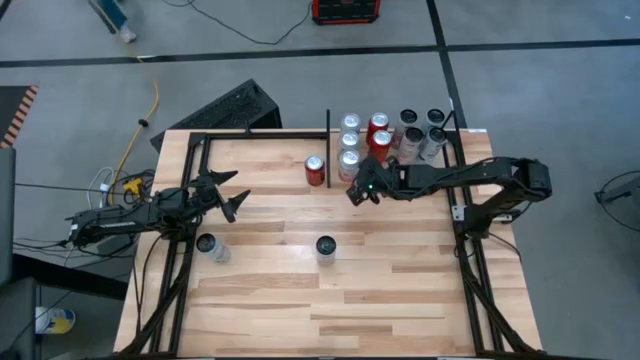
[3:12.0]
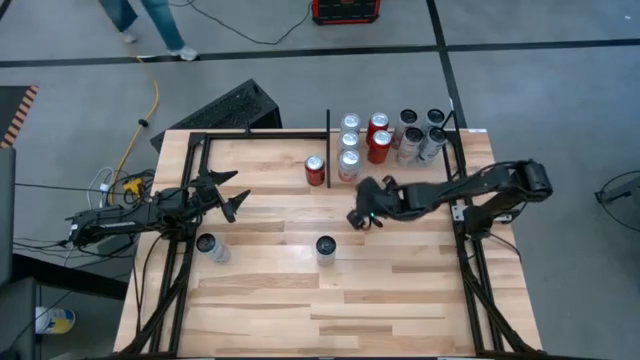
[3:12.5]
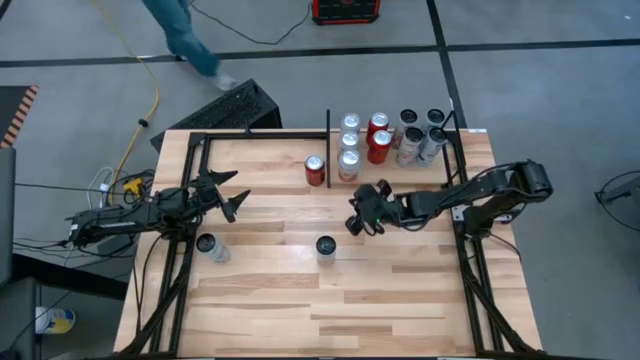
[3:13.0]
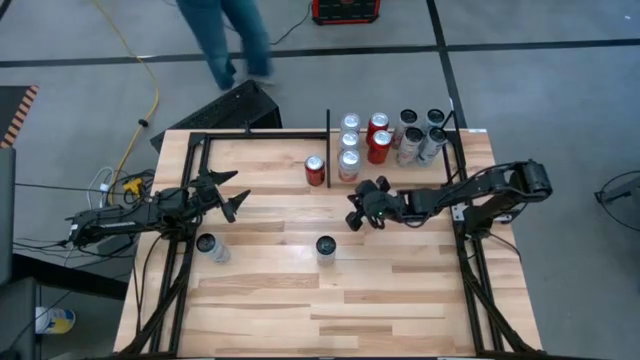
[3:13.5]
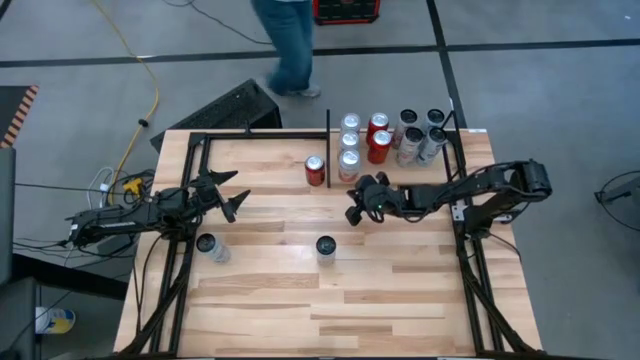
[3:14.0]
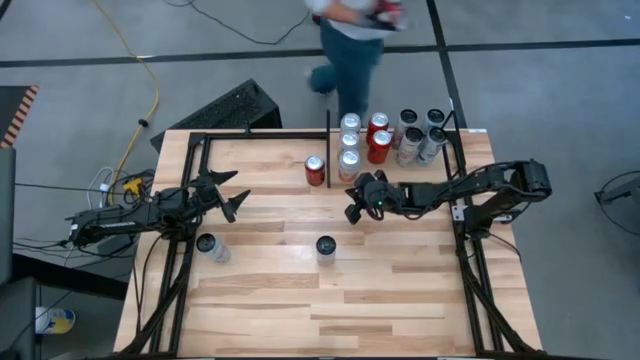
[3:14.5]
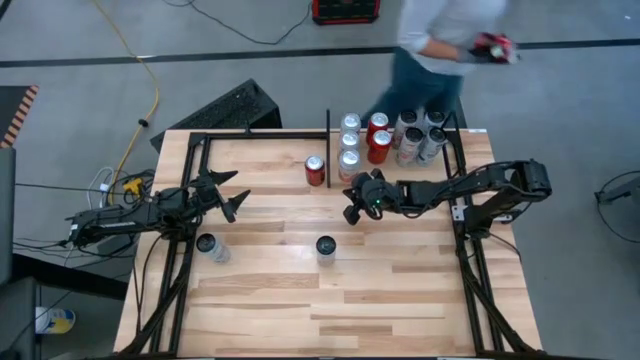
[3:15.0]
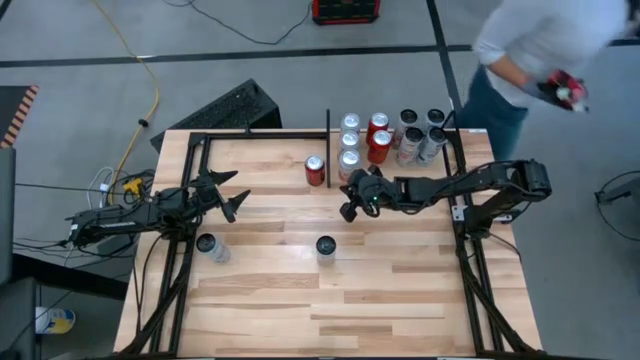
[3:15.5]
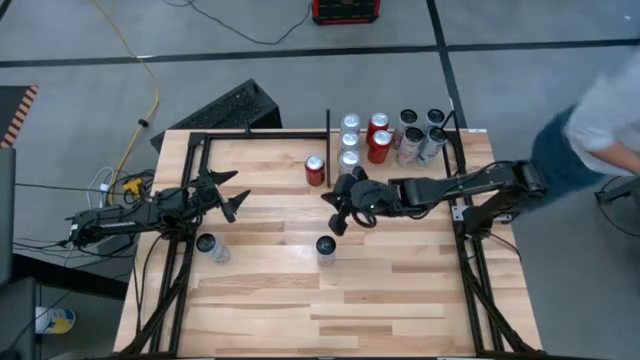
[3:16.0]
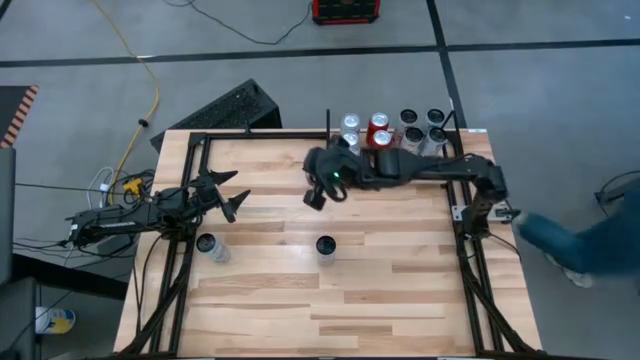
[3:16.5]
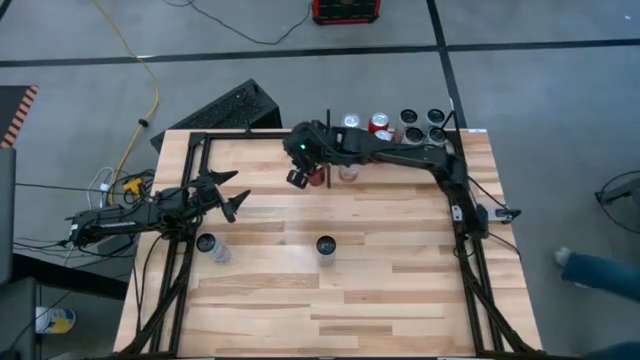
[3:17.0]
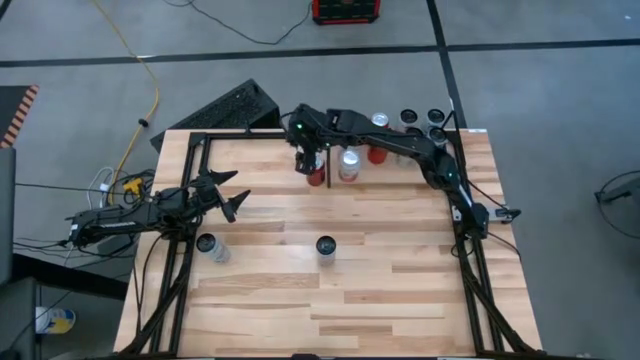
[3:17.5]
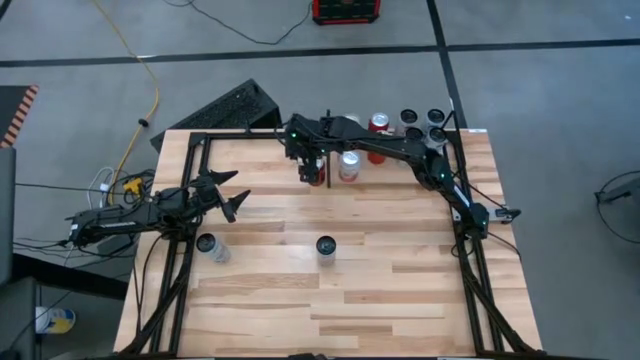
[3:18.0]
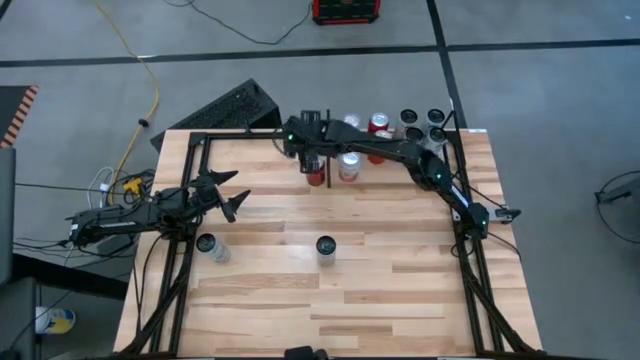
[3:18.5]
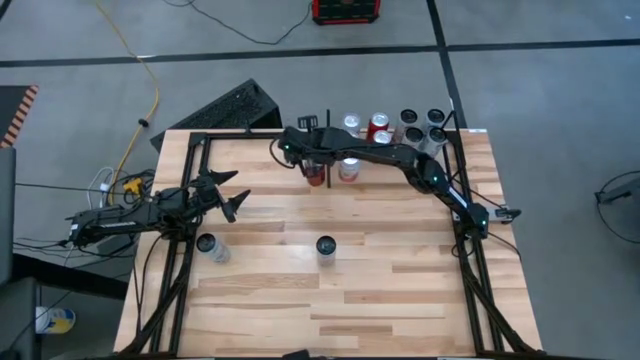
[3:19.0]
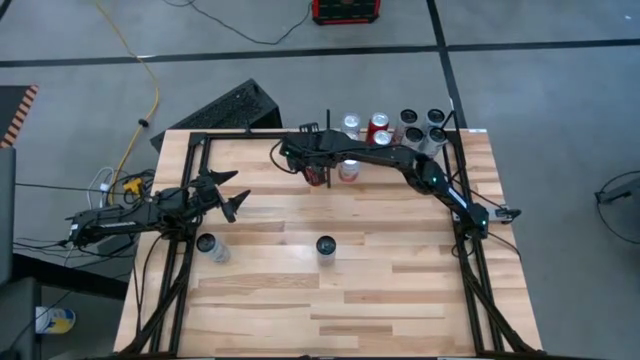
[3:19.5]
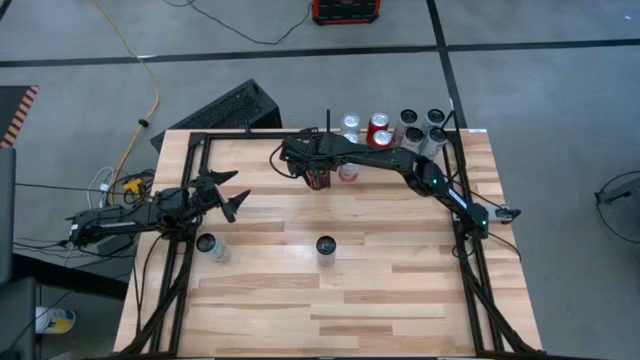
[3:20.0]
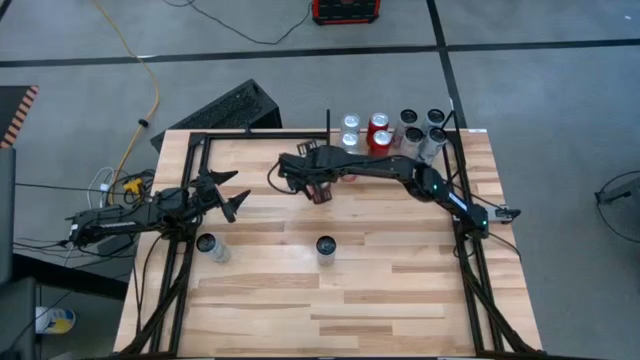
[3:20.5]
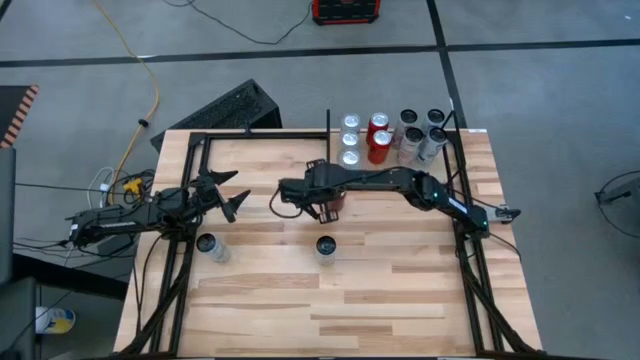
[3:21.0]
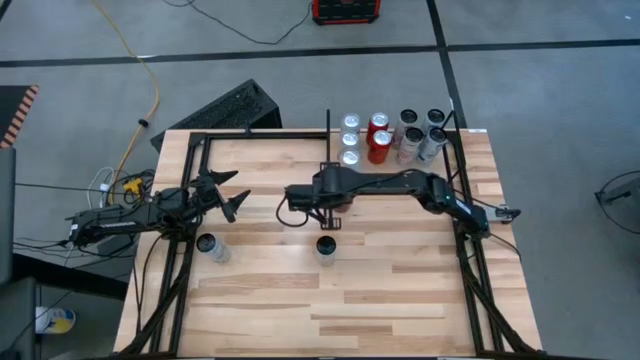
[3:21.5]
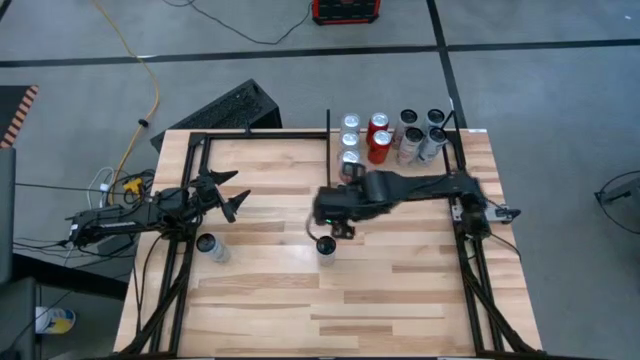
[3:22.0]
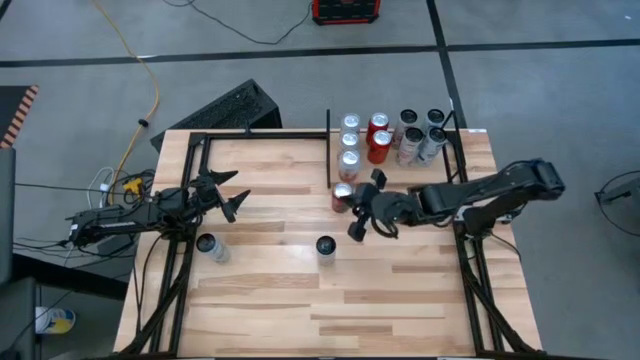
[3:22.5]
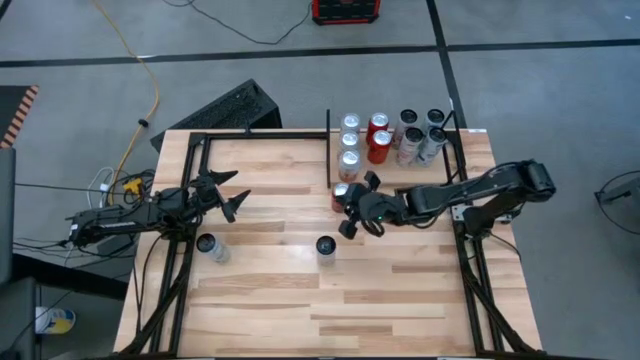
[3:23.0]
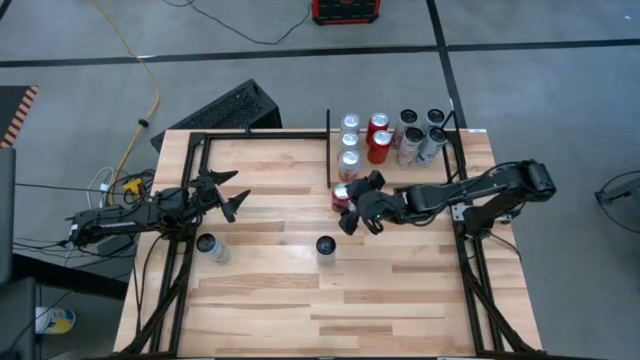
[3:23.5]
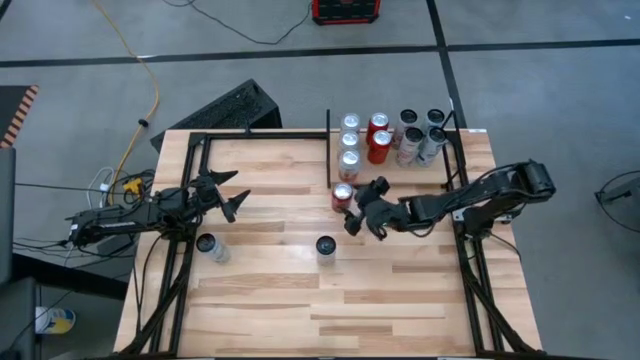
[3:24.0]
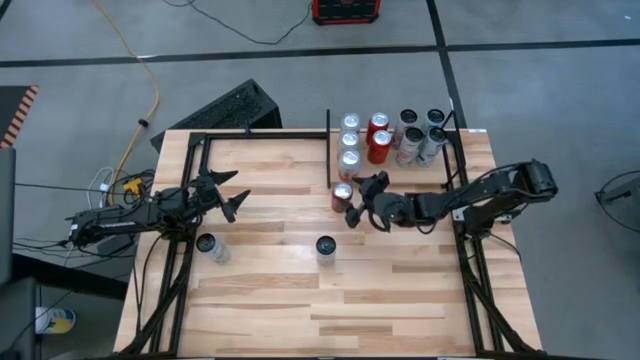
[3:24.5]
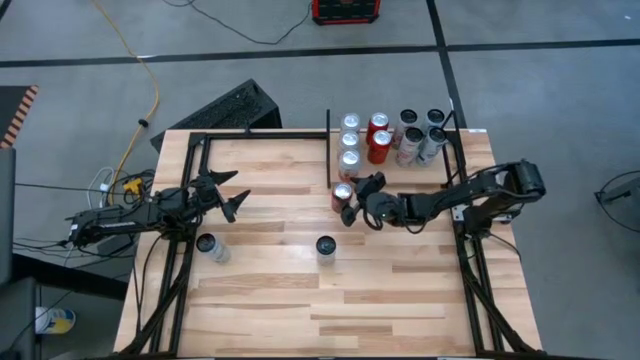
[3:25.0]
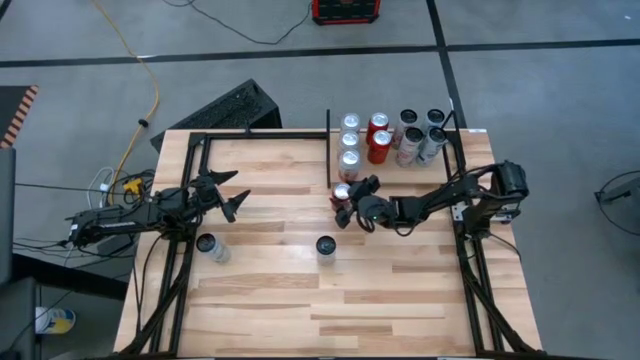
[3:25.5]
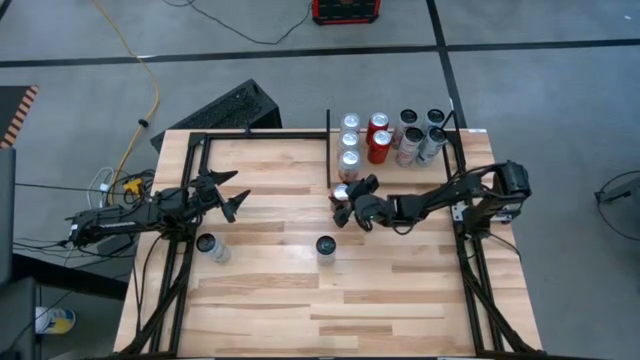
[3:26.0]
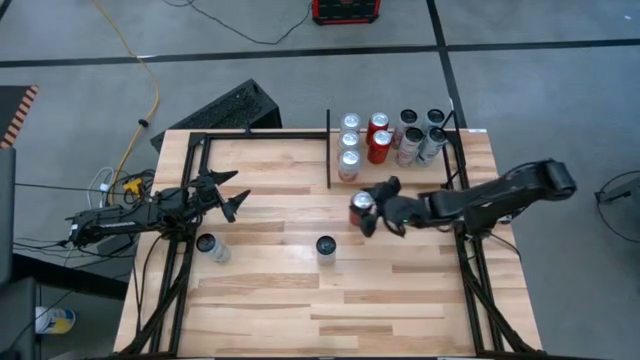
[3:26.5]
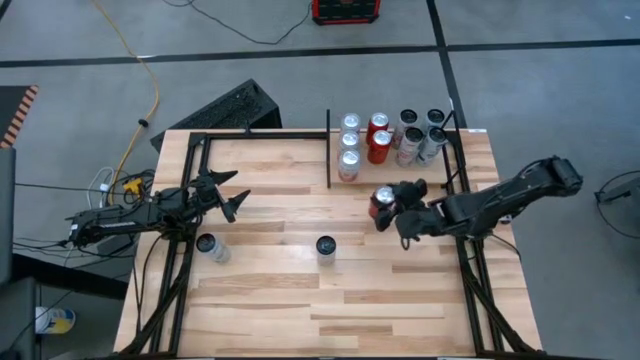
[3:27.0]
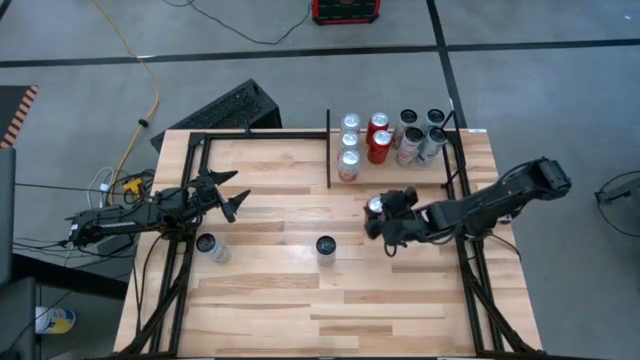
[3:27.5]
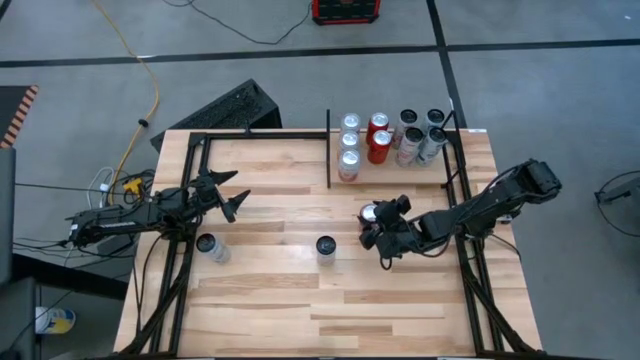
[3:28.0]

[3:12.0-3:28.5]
Task: Place canned beverage on shelf
Put the red soda can on the shelf

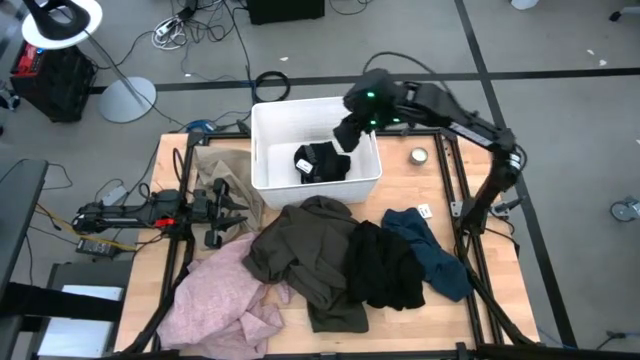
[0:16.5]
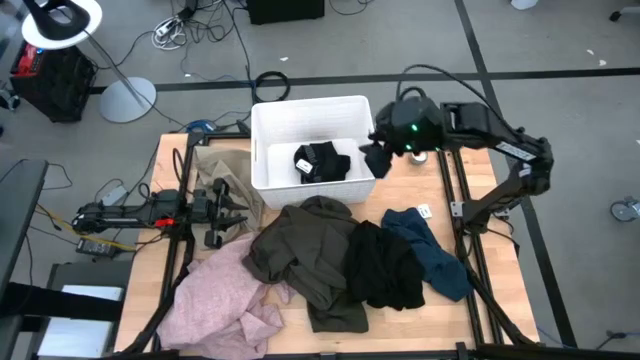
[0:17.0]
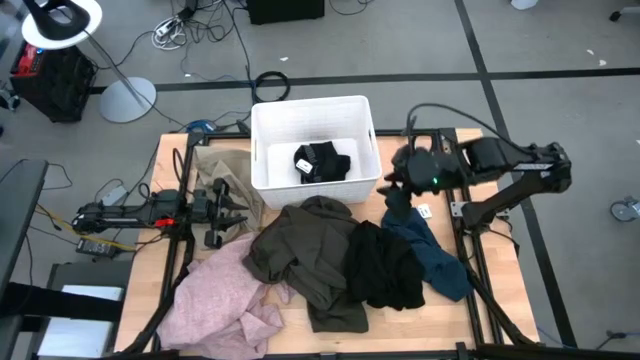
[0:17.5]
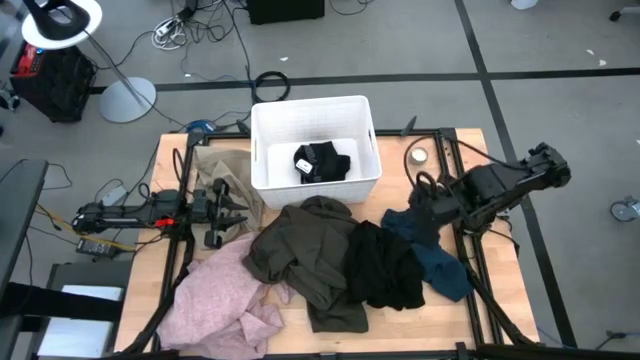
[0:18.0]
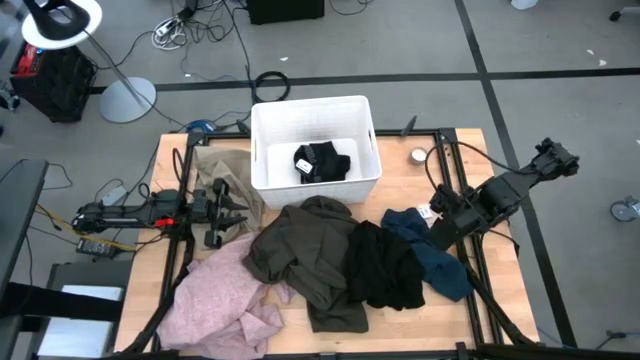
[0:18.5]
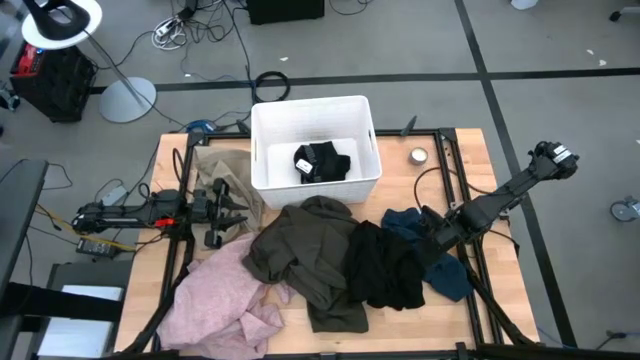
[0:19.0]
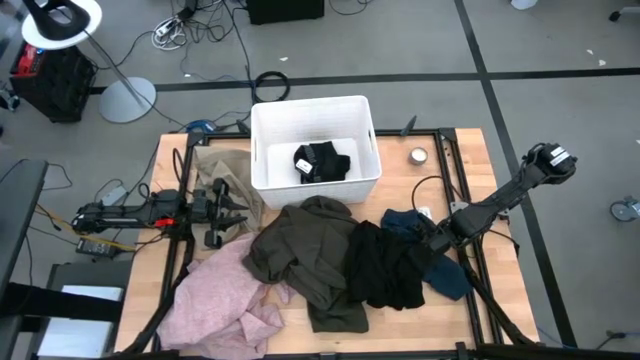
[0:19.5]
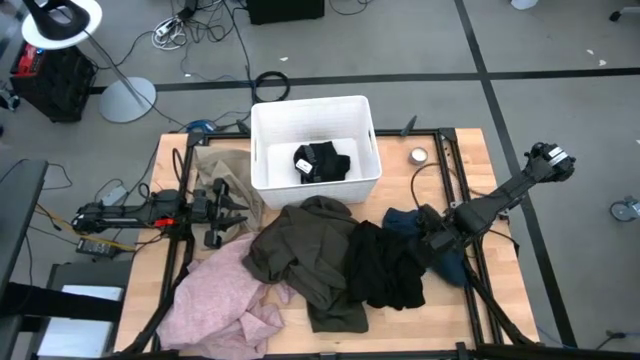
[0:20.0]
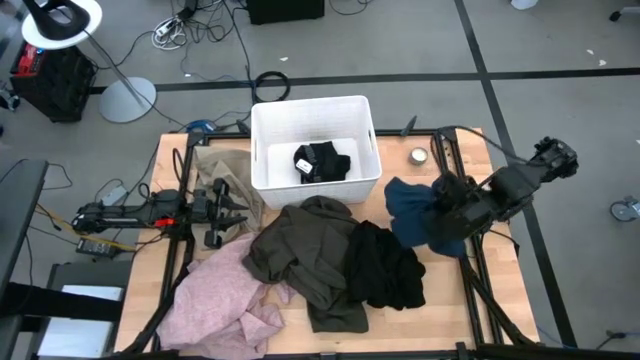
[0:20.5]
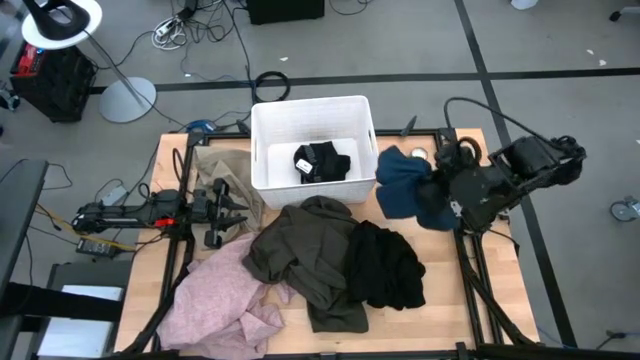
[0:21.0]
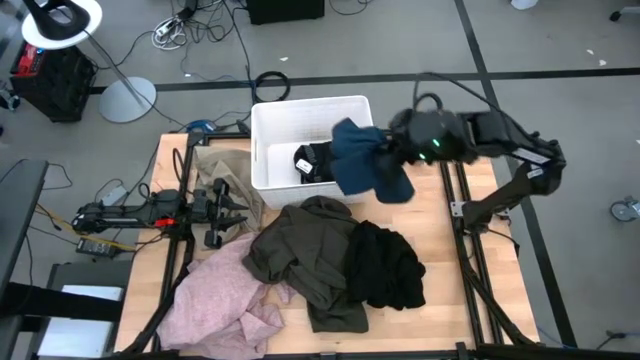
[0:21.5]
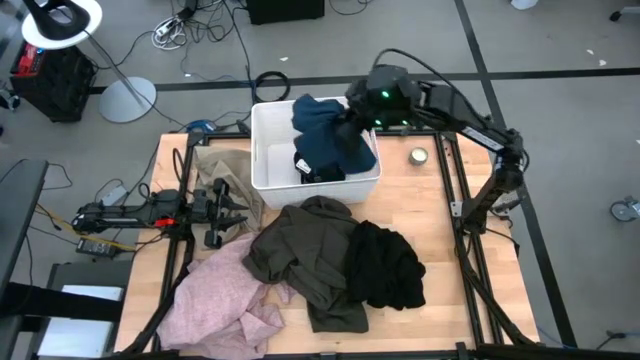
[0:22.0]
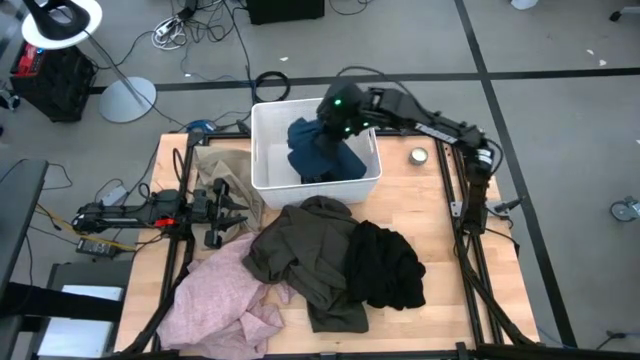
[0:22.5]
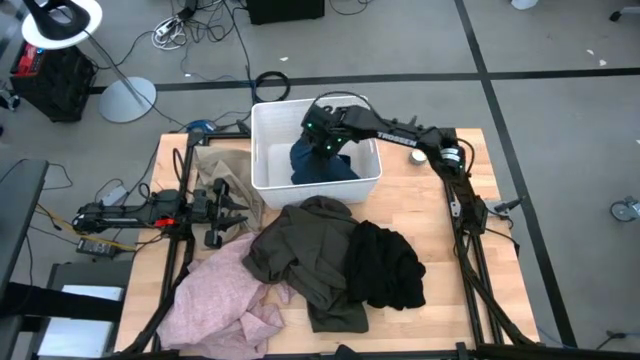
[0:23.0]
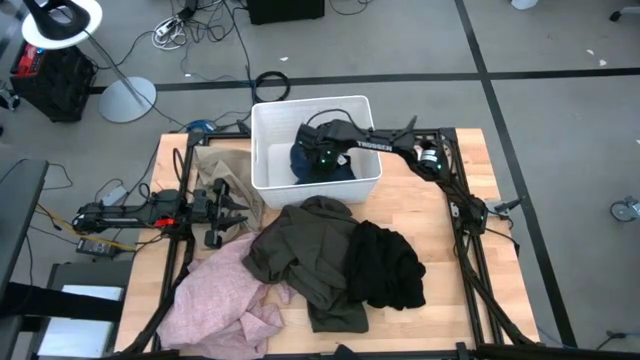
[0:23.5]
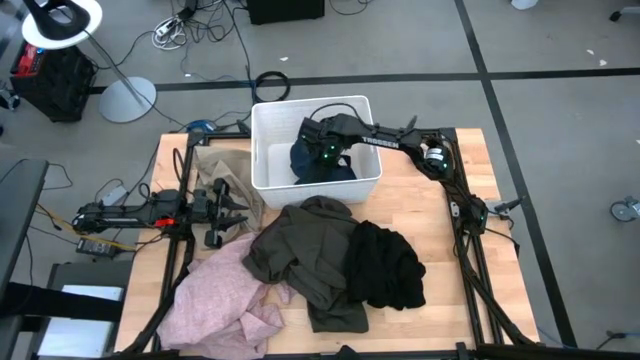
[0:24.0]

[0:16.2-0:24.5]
Task: Sort clothes
Put the blue shirt into the laundry bin
